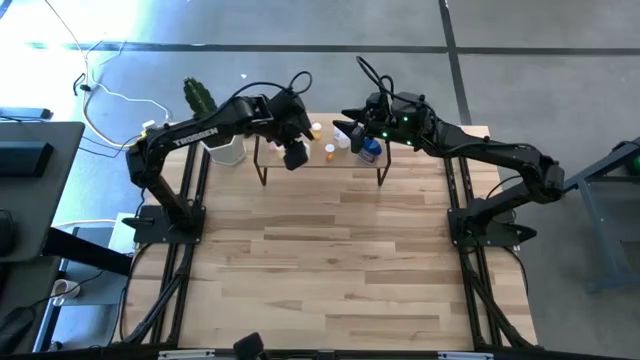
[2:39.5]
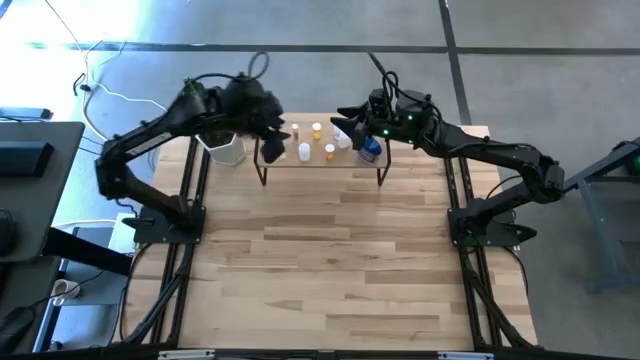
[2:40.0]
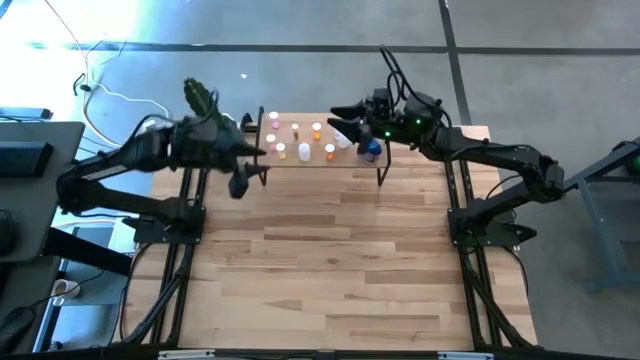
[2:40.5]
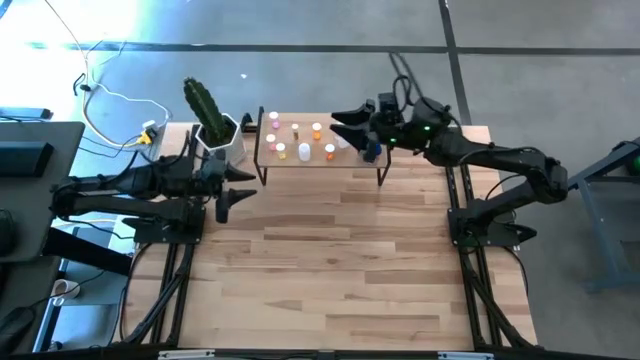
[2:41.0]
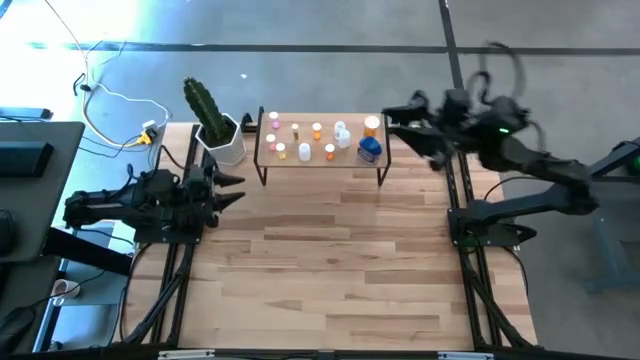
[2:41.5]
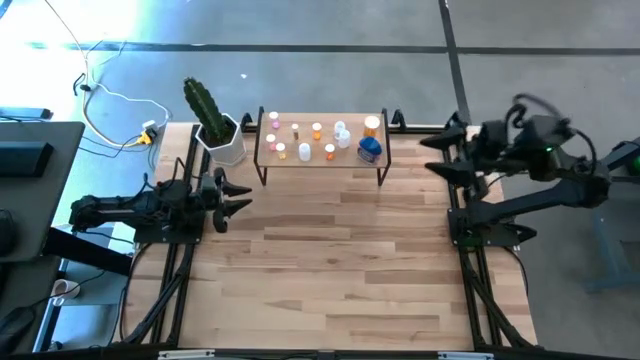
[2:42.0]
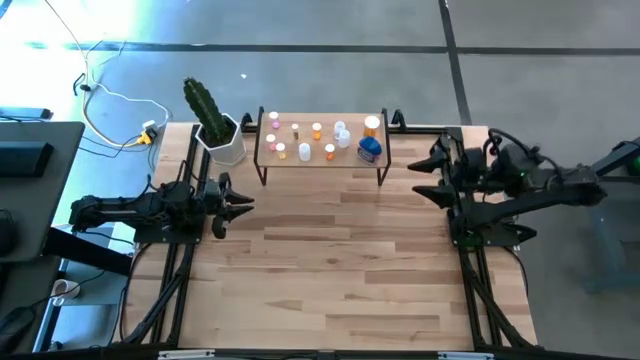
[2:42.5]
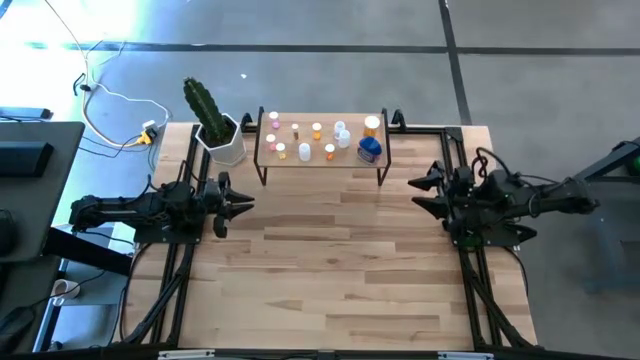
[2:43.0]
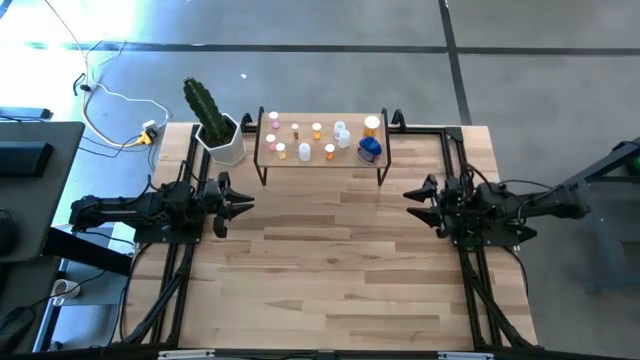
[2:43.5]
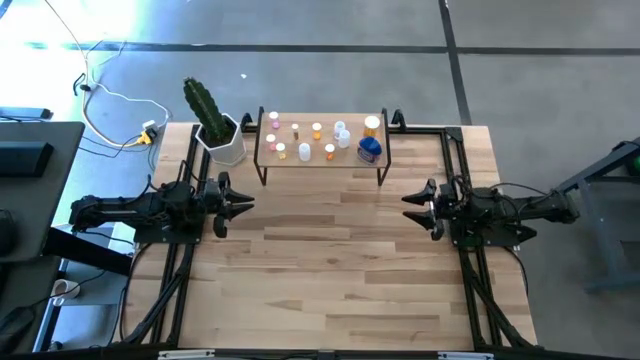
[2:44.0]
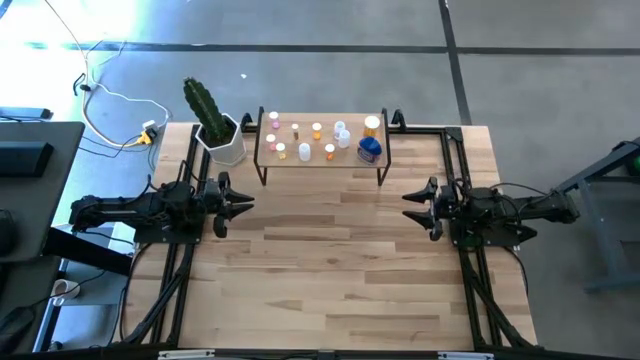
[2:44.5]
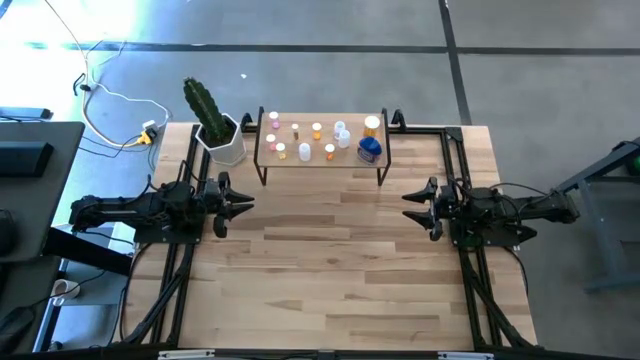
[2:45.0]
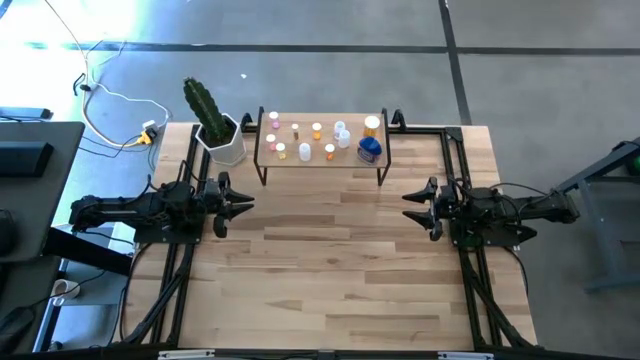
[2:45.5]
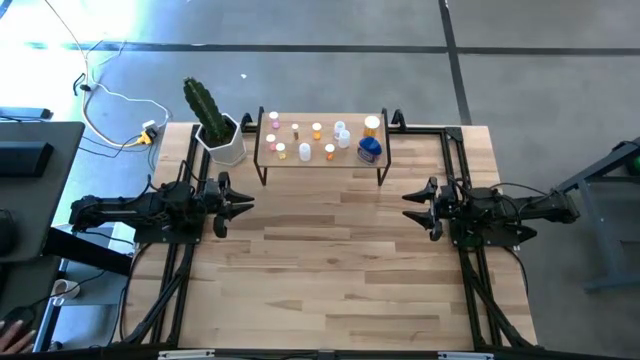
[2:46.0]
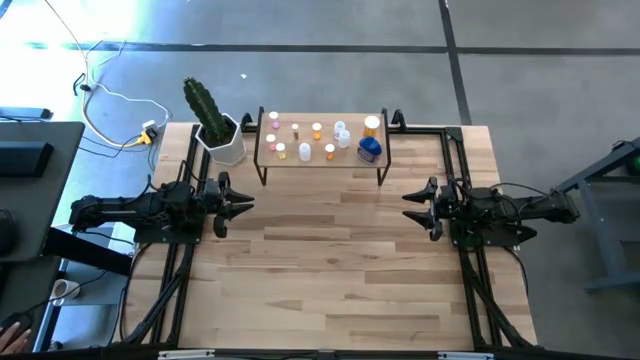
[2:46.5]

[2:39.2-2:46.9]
Task: Pick and place medicine bottles onto shelf by color
Return to Home Position

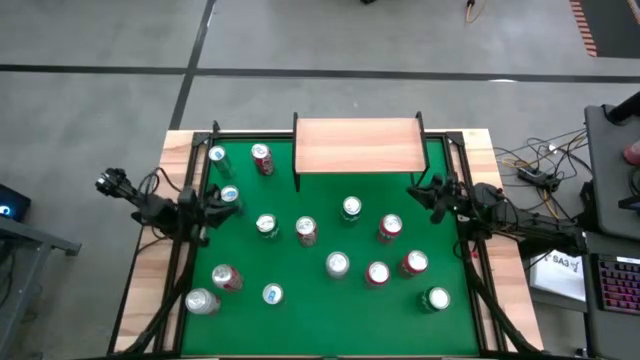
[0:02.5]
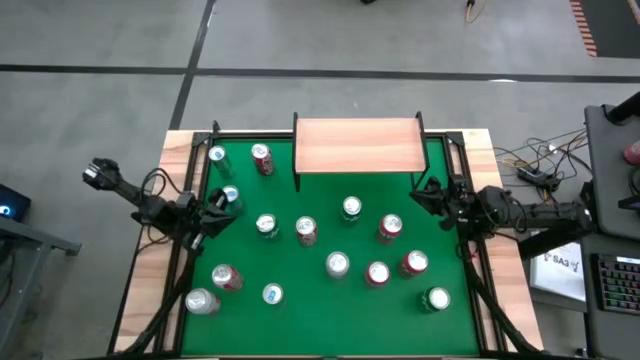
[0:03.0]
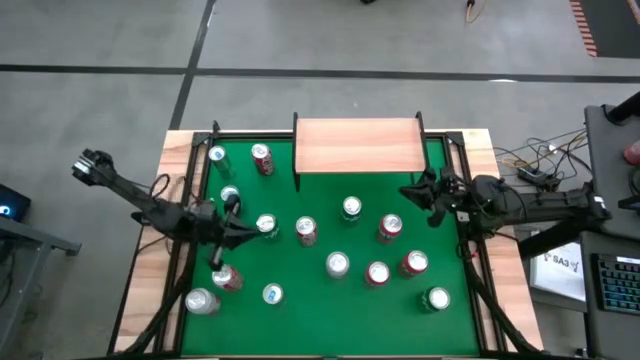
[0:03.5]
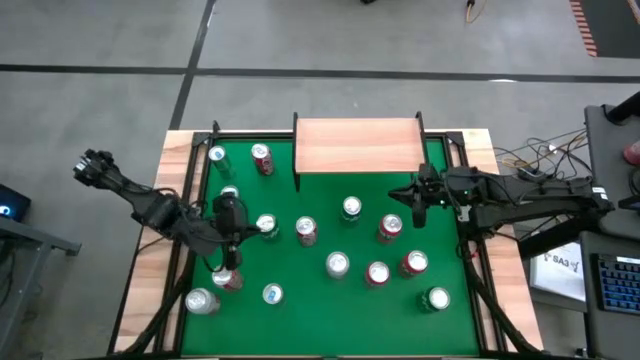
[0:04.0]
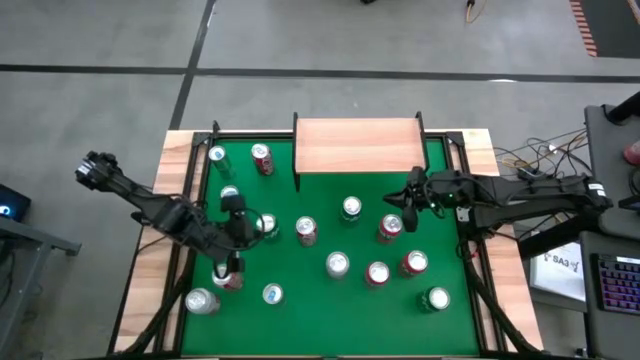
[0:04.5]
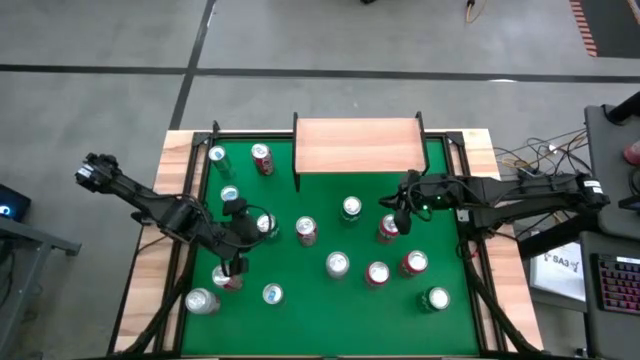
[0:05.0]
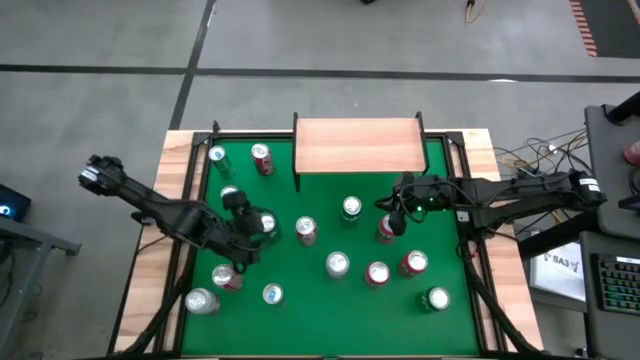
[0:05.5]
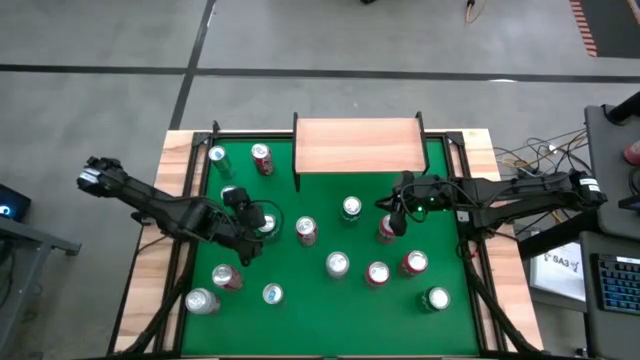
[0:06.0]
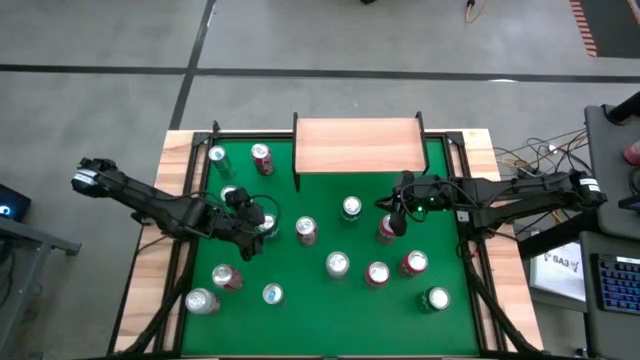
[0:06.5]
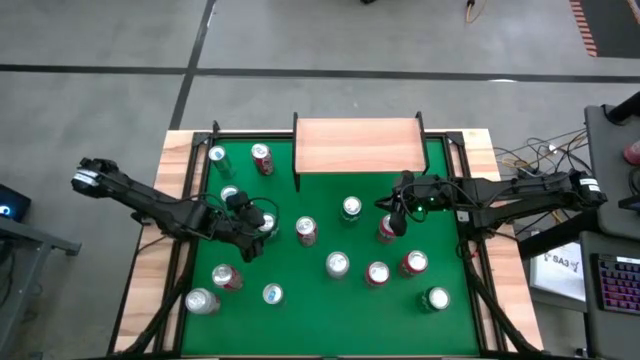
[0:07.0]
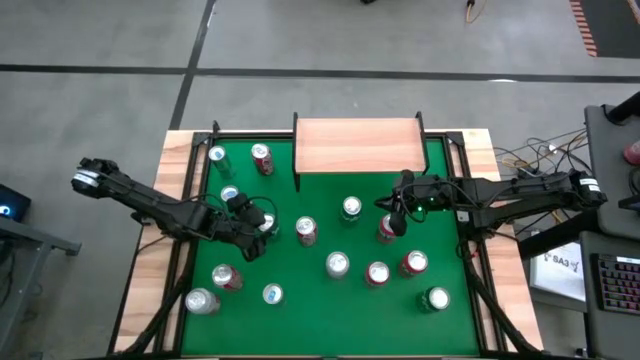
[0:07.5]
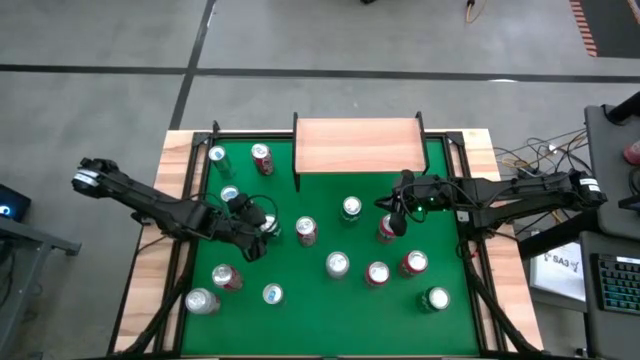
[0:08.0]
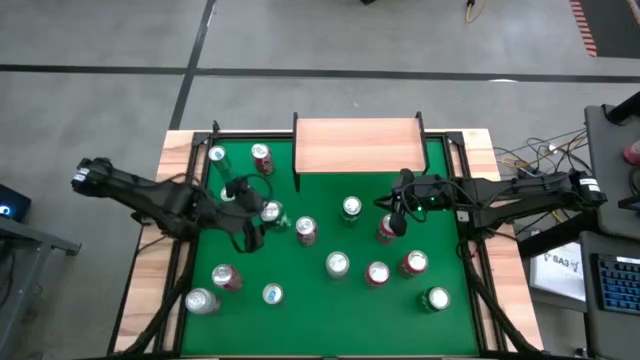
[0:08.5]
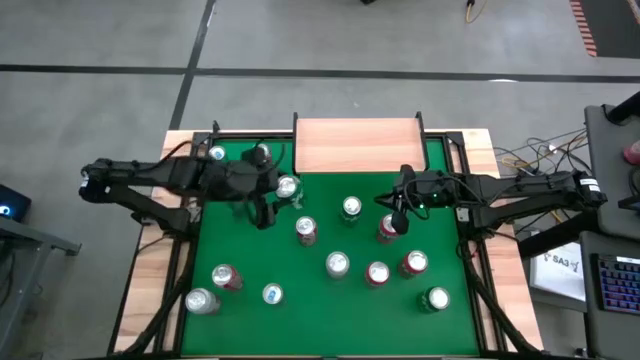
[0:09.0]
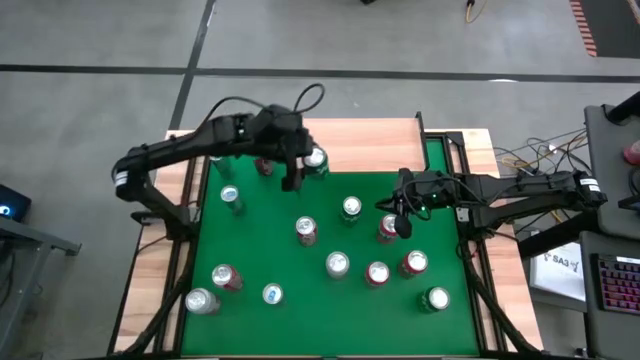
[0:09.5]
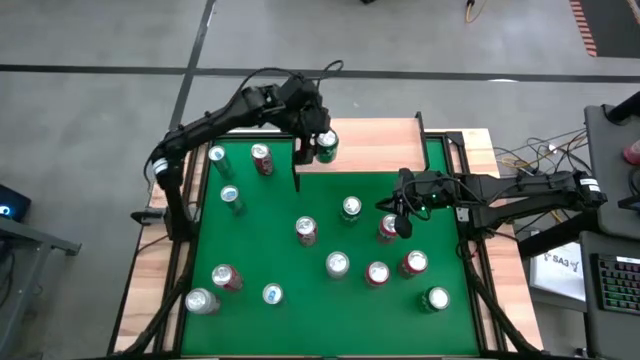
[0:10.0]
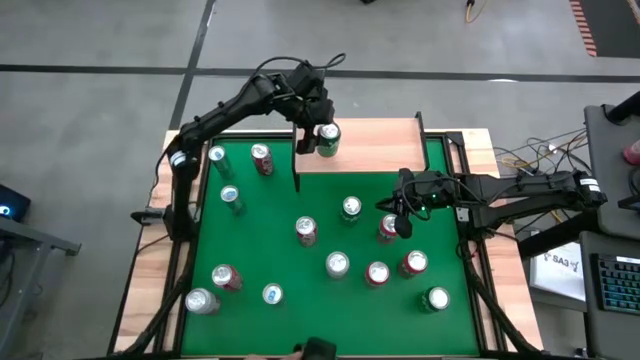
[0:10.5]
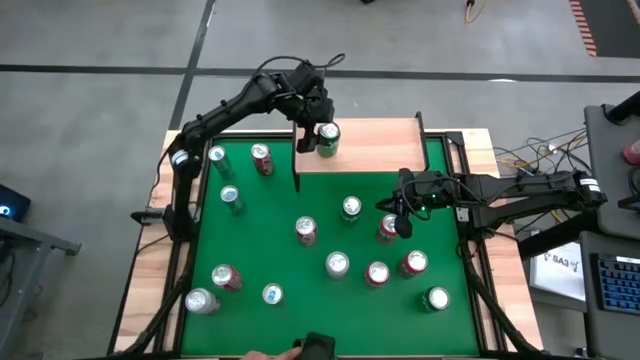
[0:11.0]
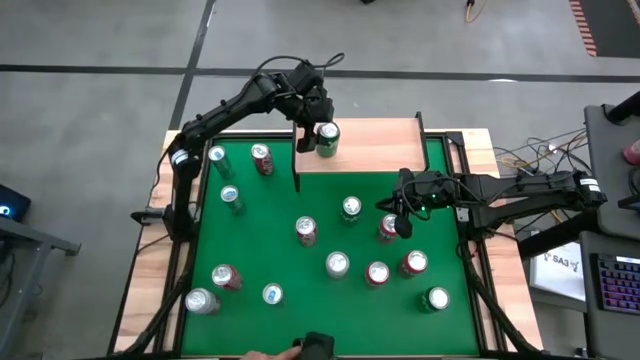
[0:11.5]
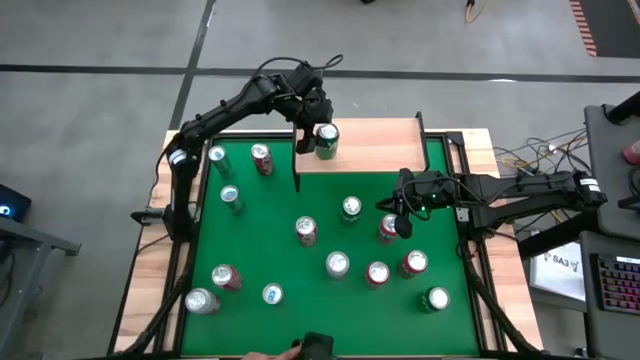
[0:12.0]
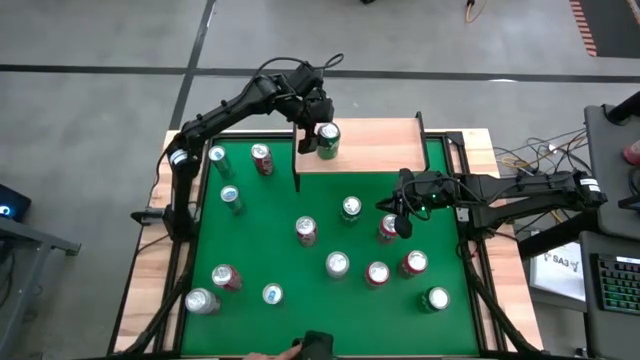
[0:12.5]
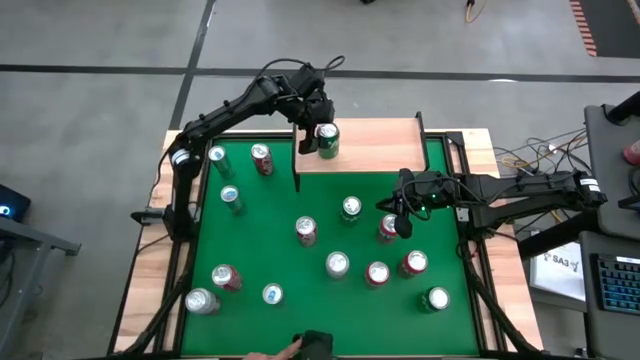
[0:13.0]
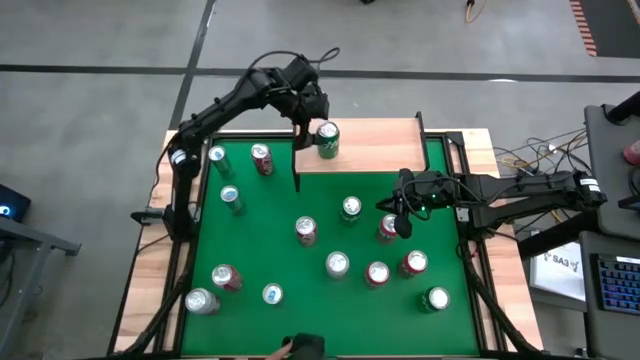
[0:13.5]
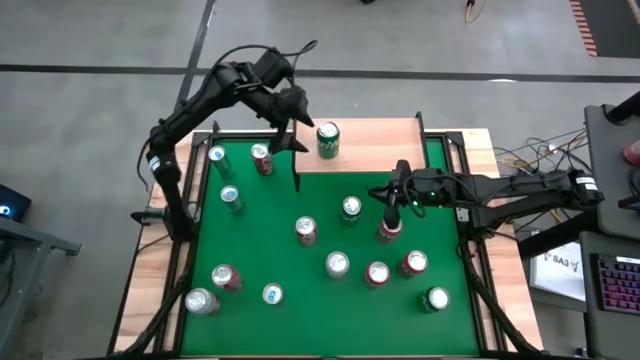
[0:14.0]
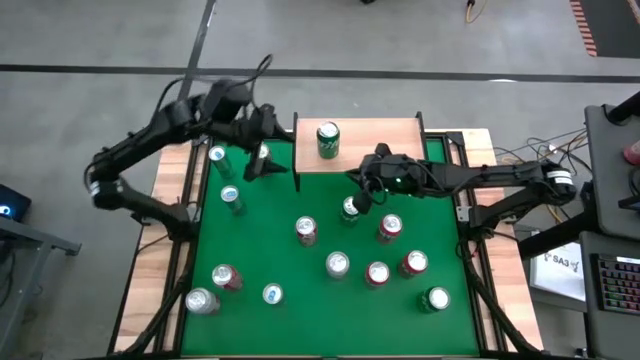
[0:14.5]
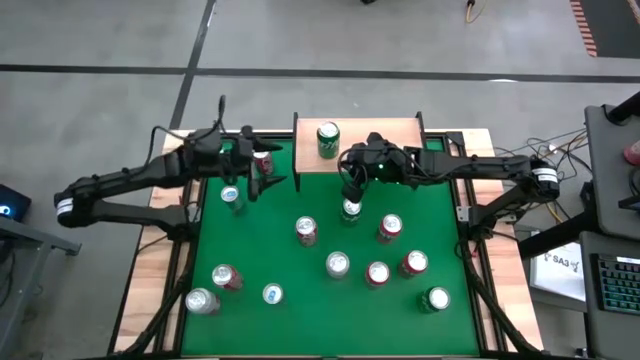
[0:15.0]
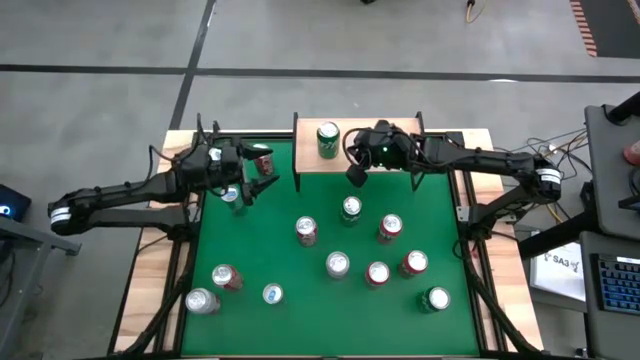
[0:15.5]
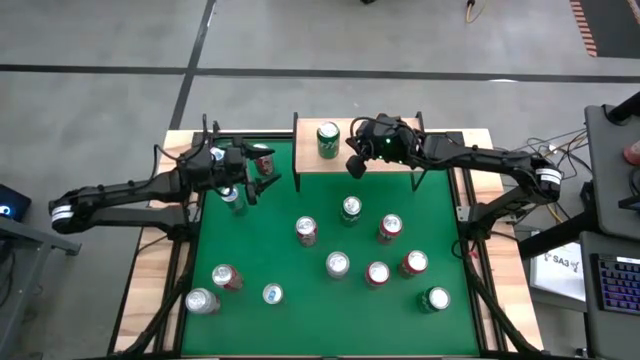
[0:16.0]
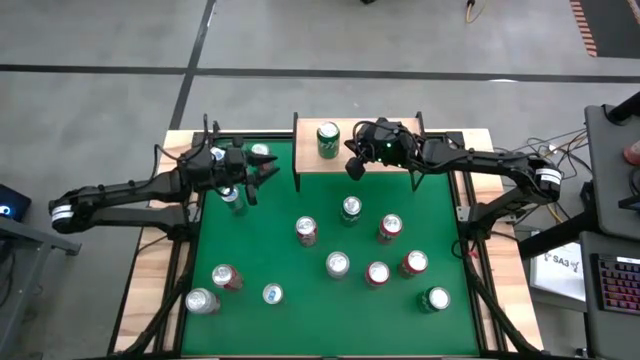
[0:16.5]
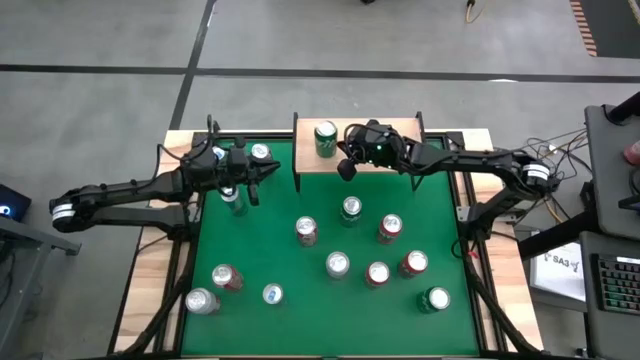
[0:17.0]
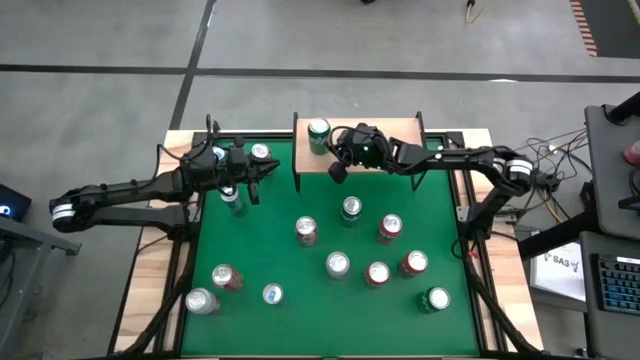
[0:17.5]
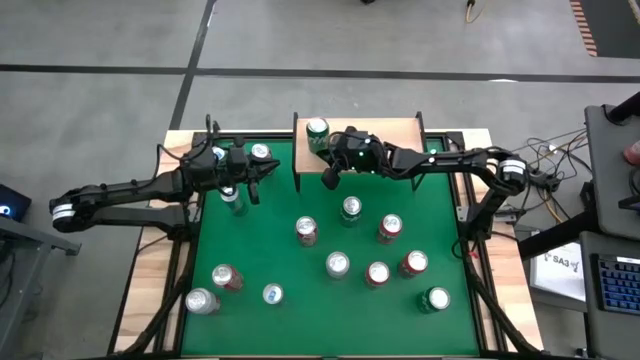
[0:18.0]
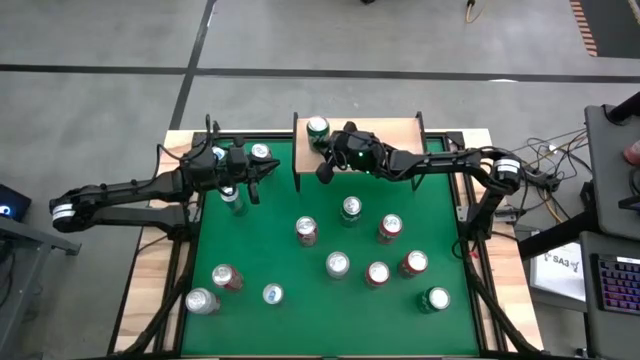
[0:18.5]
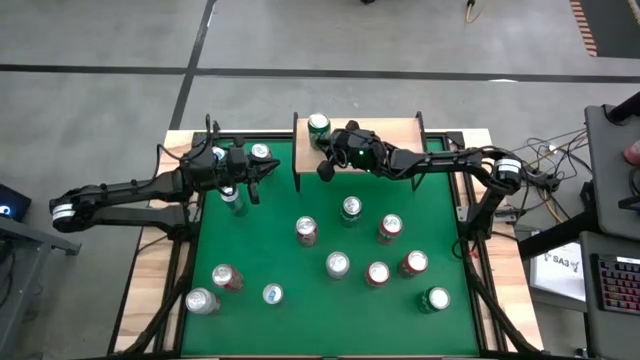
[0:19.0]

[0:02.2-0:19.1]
Task: Place canned beverage on shelf
Put the middle green soda can on the shelf
